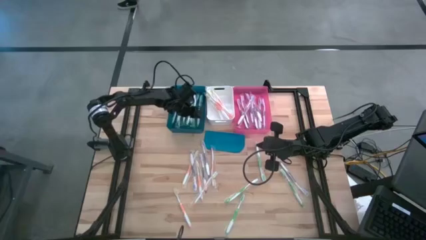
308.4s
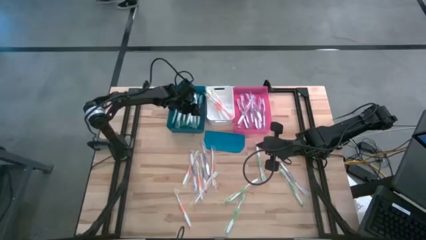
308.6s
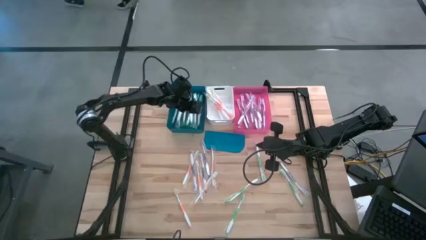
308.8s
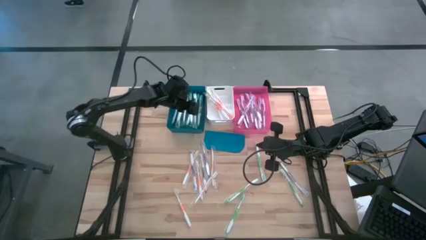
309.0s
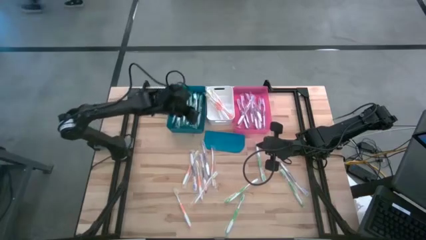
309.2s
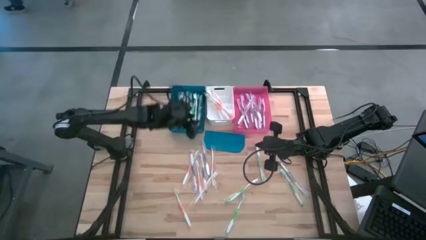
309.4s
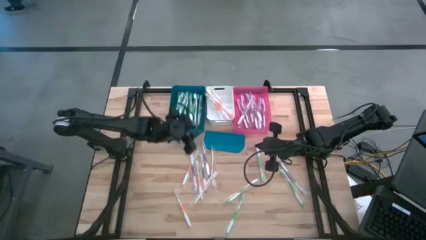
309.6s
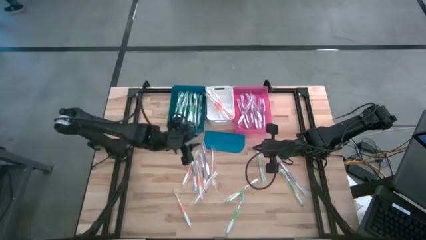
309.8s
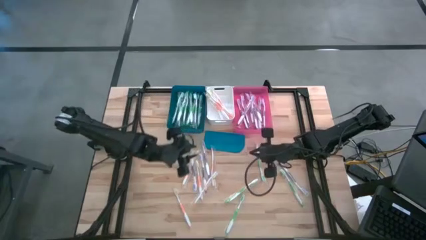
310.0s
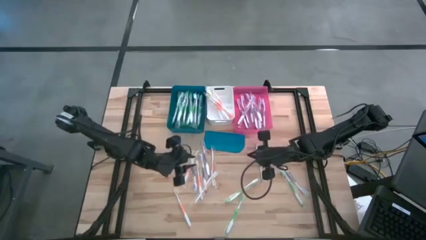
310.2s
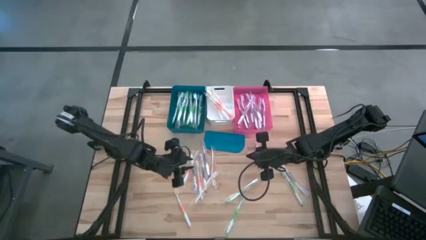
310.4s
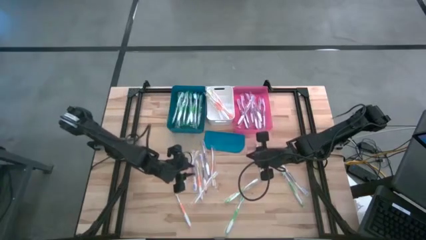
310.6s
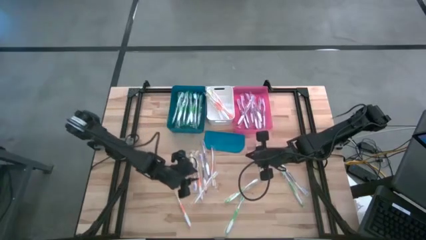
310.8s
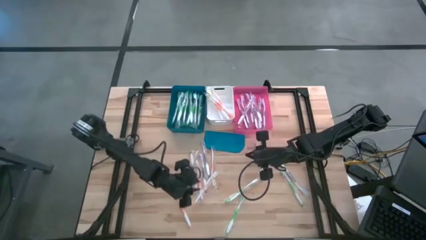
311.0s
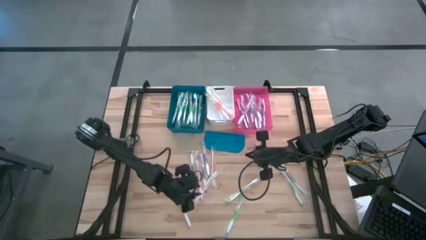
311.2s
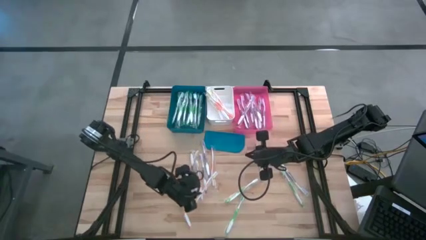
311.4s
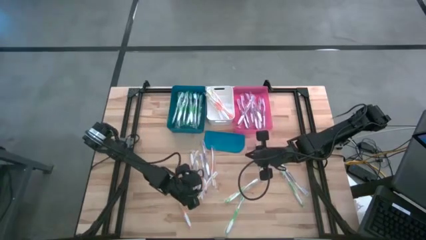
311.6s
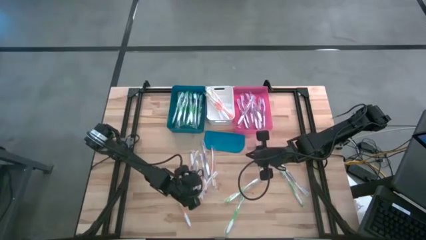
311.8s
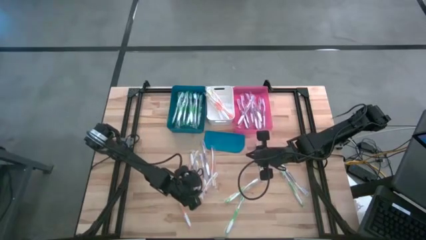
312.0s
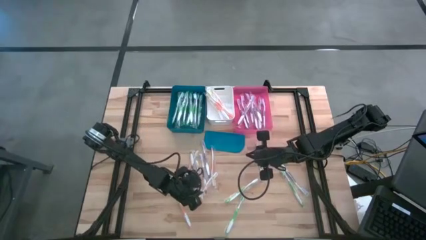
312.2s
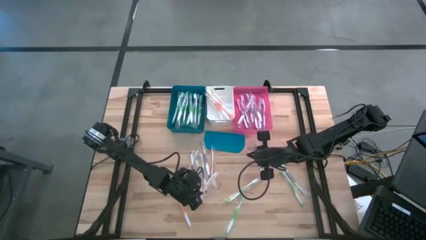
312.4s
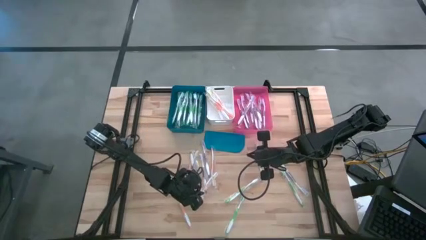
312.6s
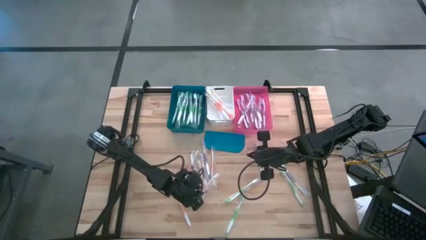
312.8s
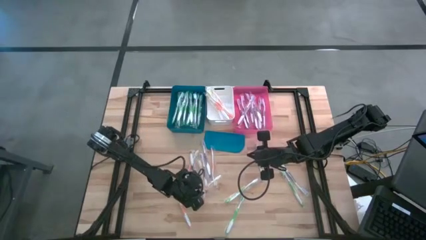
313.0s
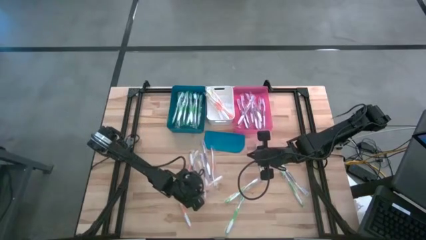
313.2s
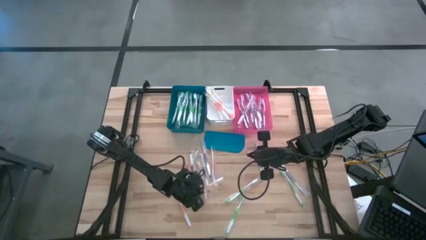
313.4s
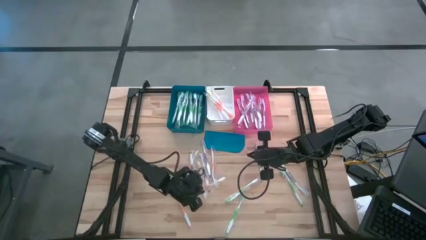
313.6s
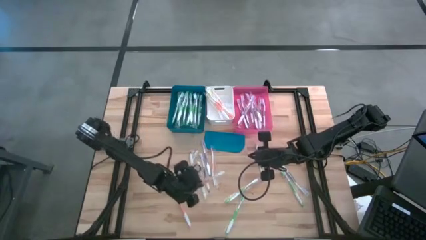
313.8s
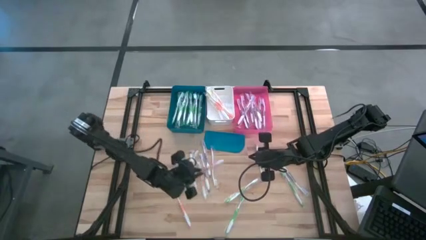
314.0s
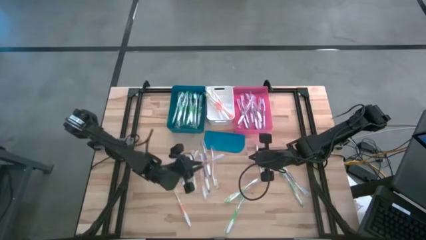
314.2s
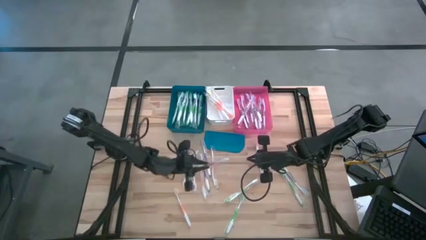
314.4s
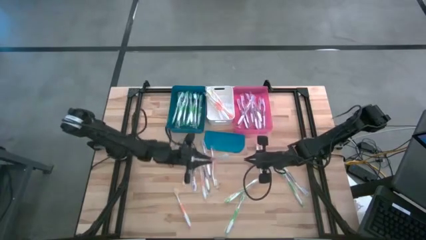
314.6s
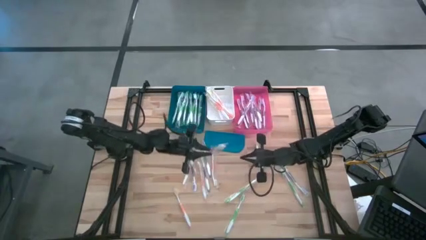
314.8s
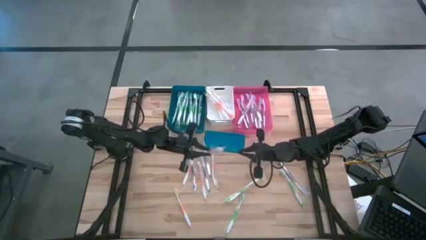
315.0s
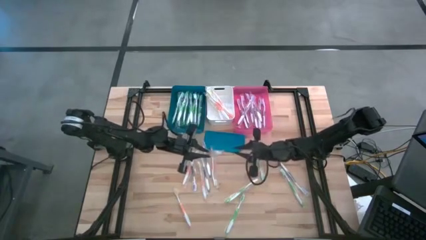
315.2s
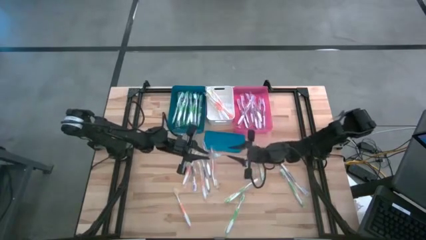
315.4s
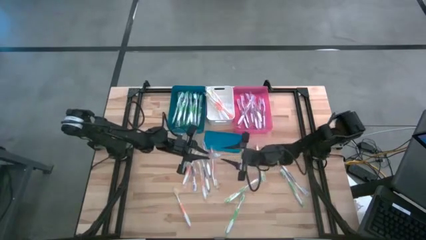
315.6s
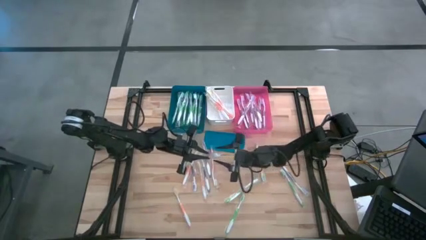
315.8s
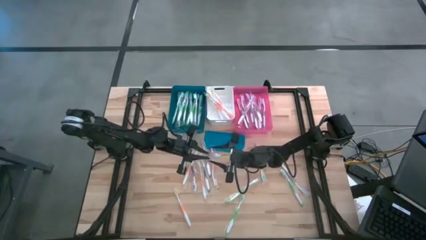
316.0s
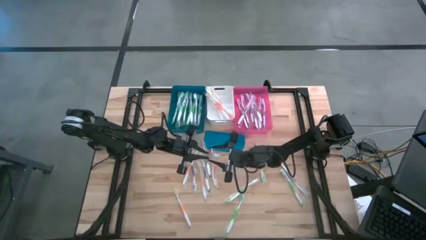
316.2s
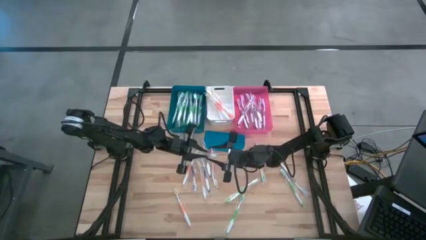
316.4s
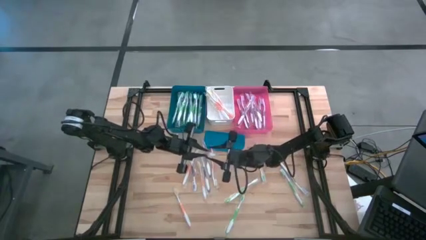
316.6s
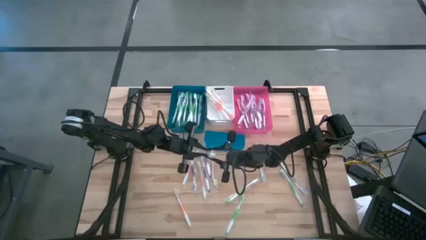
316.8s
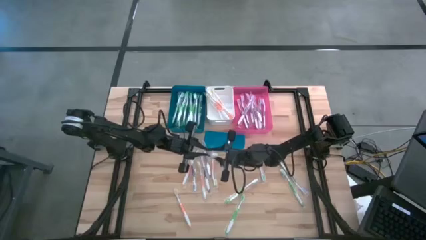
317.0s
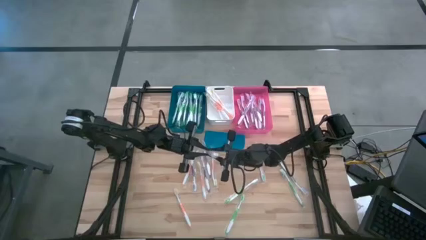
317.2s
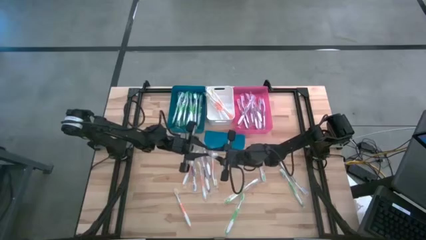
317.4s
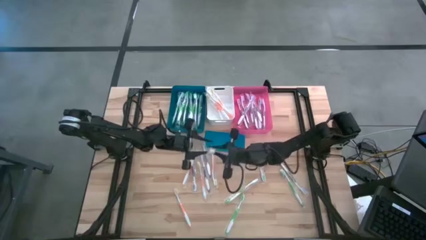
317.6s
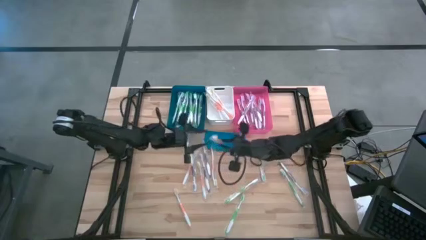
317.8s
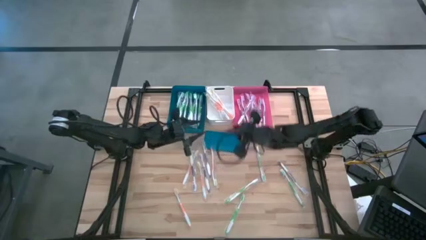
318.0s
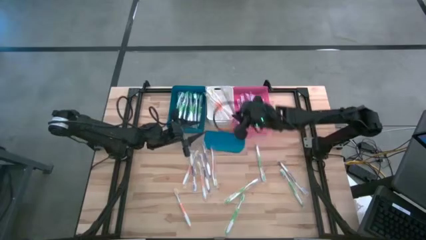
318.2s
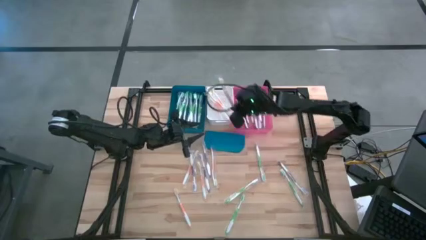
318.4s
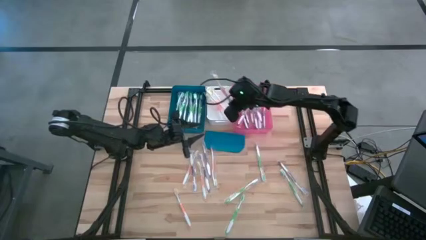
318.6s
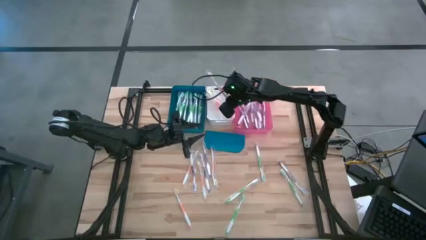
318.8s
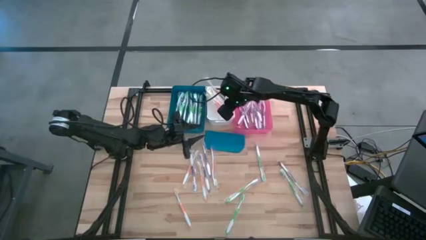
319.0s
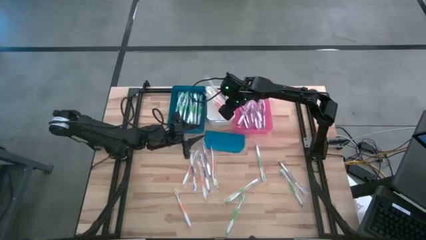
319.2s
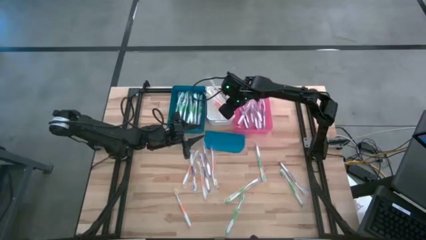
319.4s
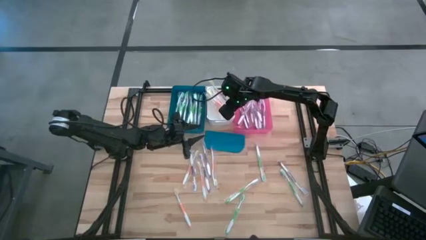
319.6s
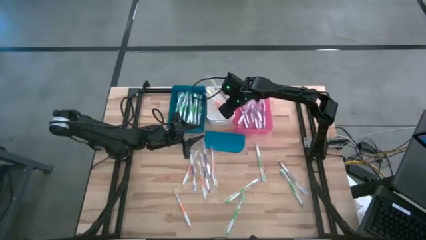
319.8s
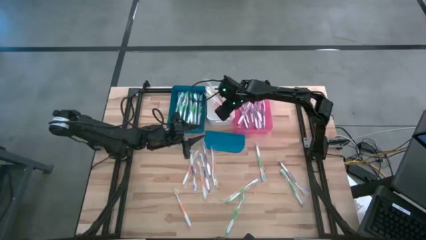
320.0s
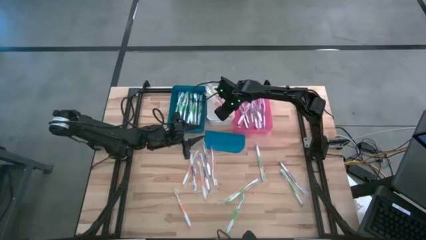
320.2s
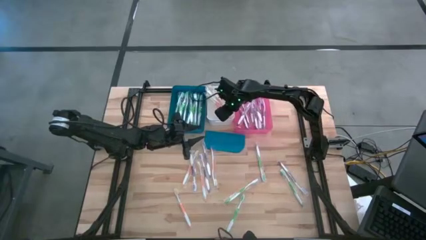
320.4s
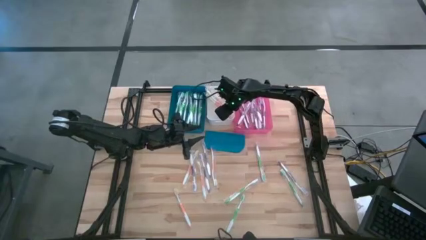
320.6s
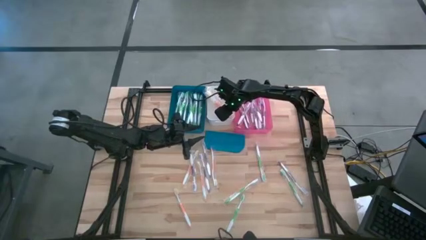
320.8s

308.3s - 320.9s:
Task: Pick & Place Toothbrushes
Put the orange toothbrush into the white bin

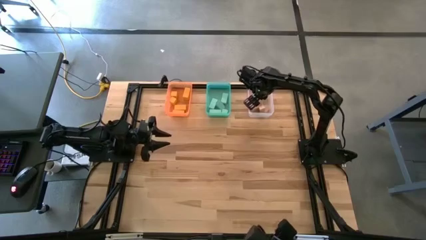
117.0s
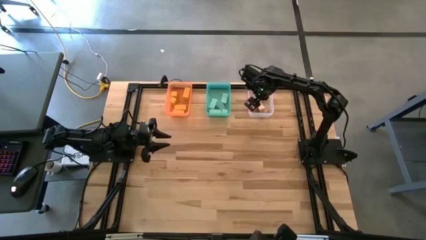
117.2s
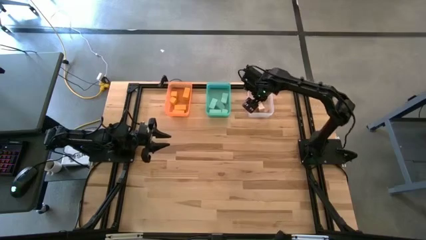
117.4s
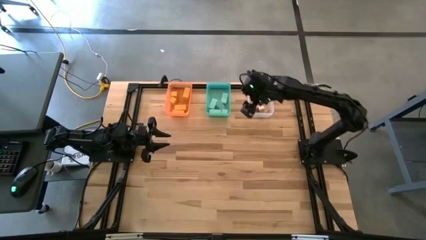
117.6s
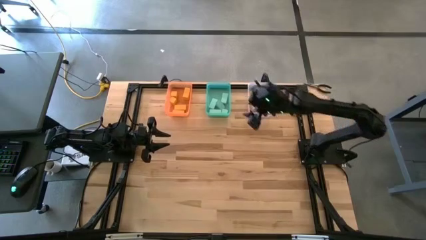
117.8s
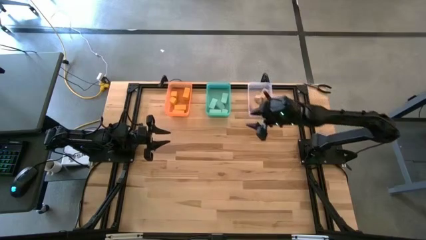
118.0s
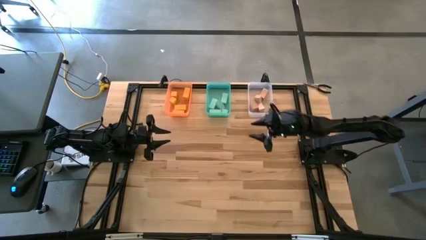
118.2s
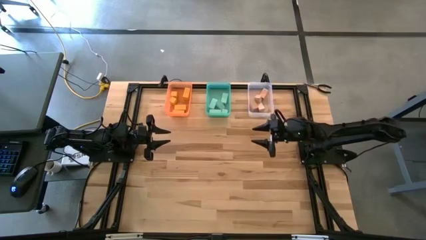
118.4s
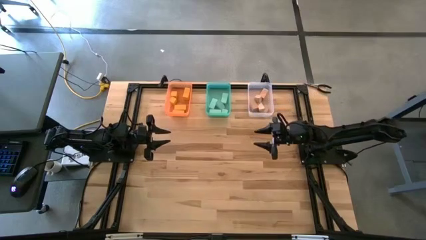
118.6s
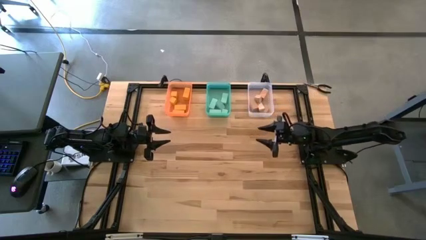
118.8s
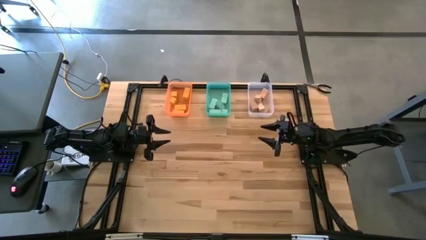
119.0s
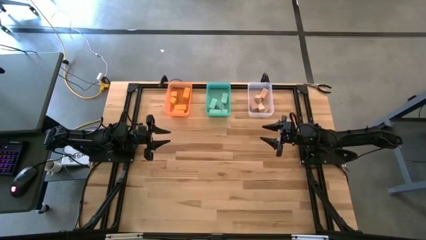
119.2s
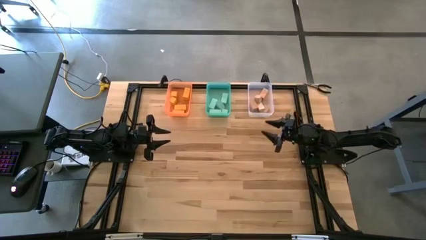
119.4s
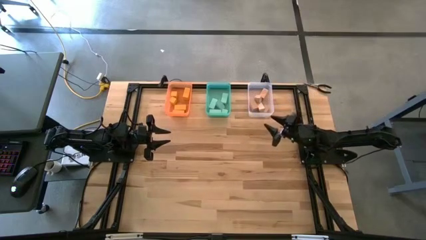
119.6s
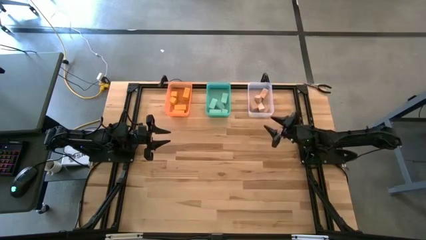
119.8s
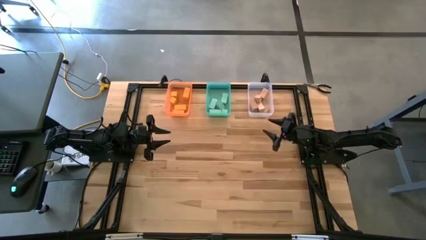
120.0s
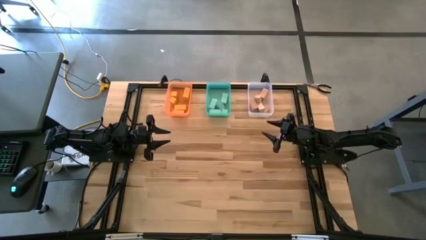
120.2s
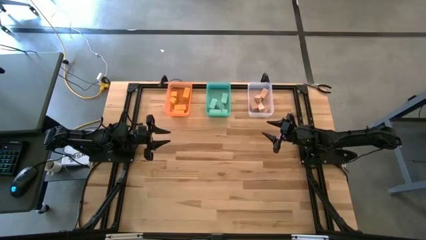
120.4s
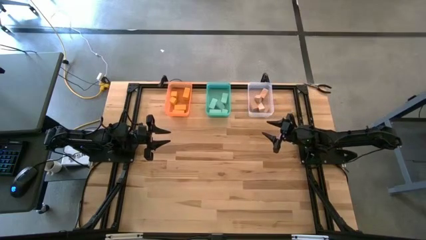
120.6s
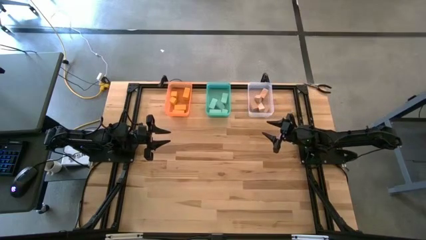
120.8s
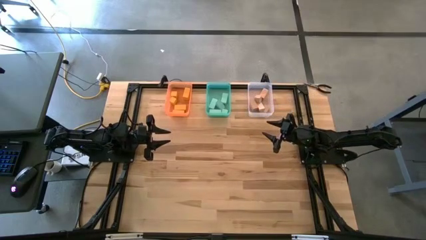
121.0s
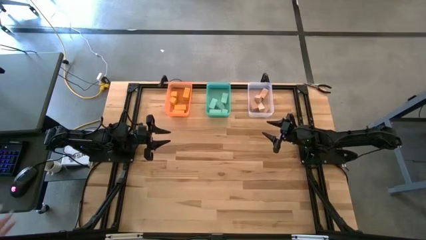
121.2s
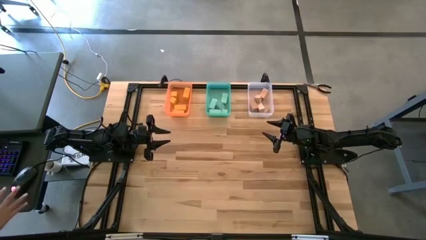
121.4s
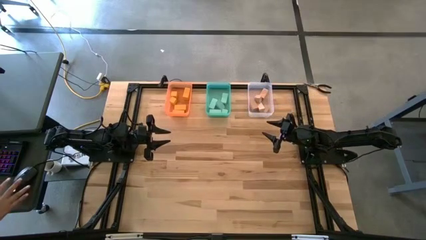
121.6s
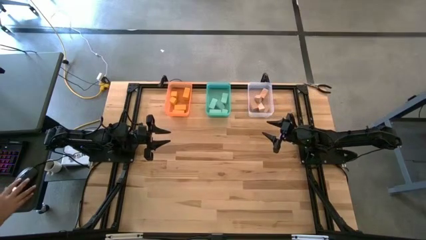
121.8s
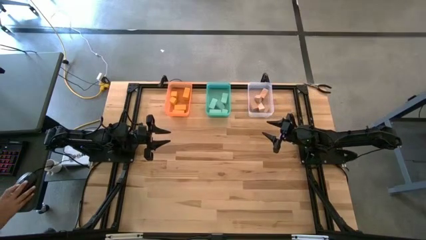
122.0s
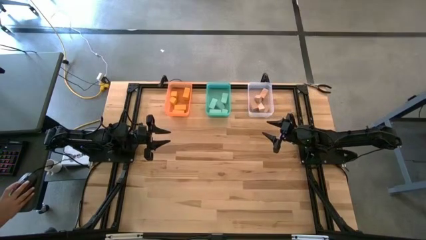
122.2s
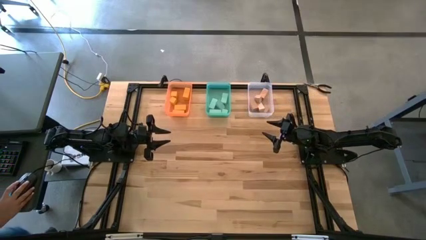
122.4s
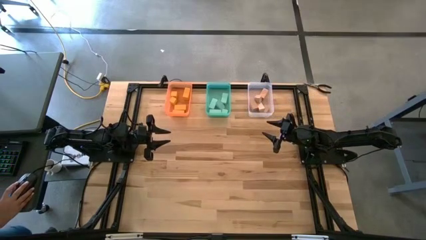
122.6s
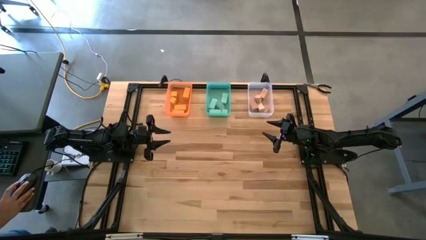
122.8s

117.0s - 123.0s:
Task: Sort & place blocks by color
Return to Home Position
